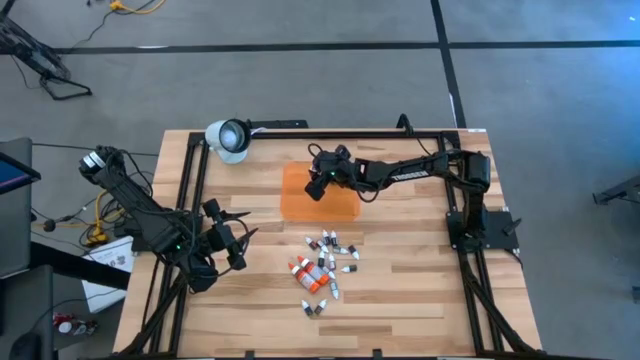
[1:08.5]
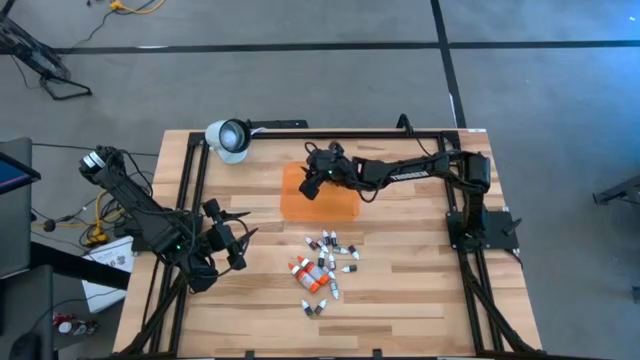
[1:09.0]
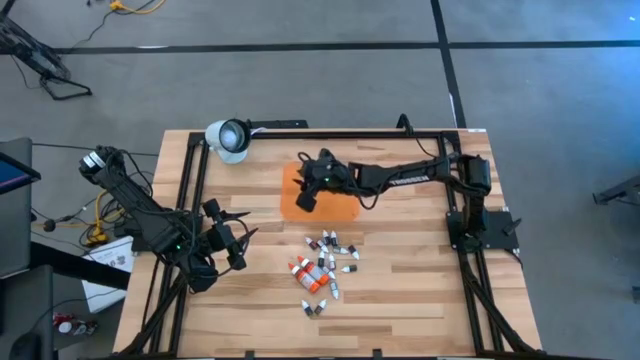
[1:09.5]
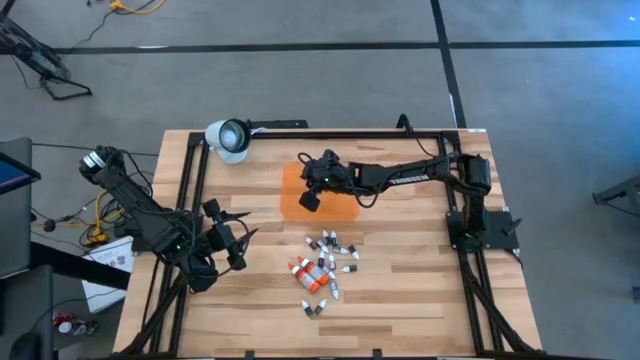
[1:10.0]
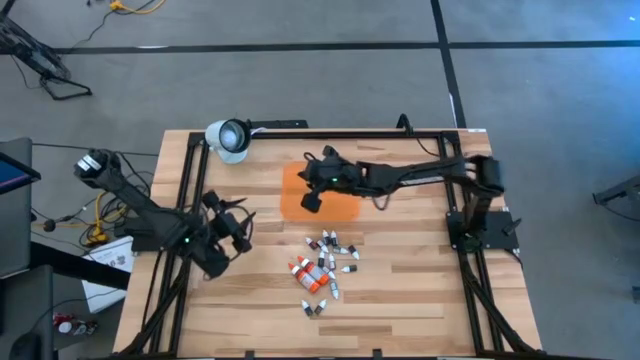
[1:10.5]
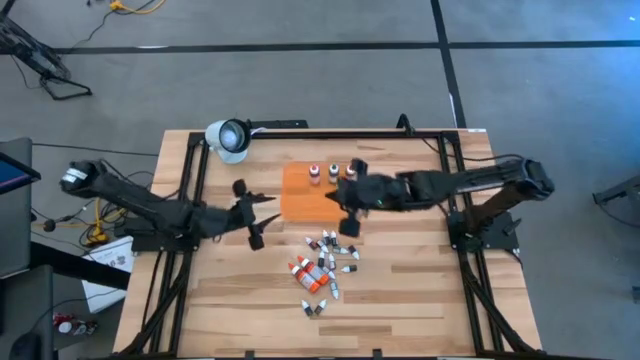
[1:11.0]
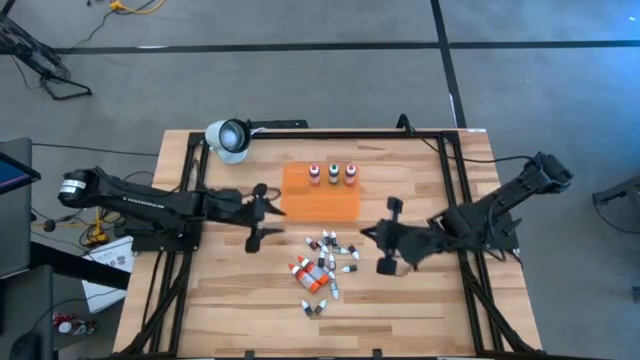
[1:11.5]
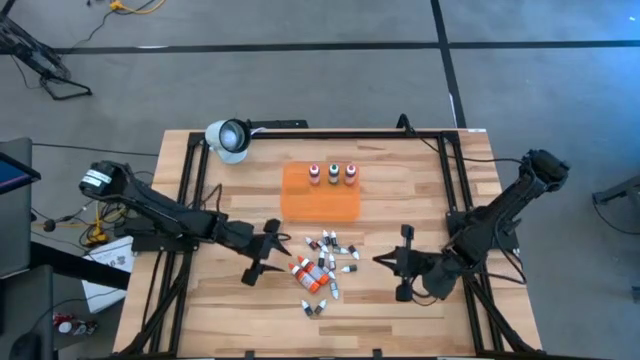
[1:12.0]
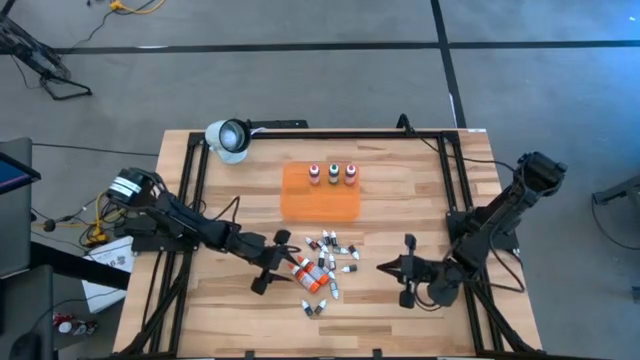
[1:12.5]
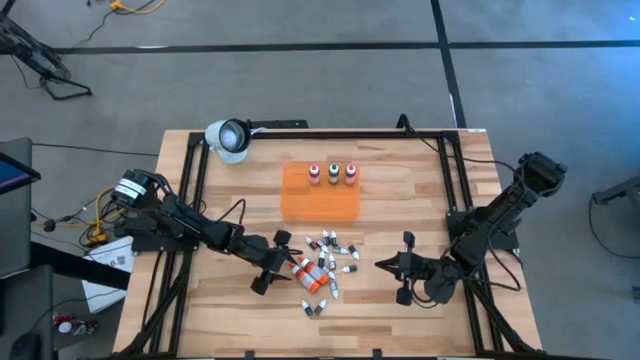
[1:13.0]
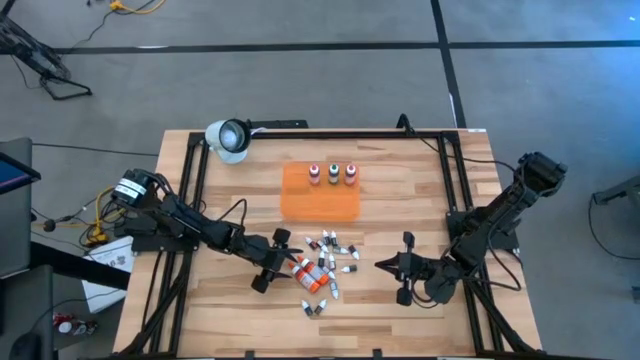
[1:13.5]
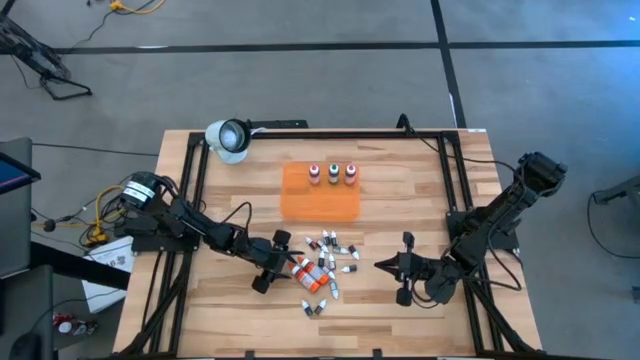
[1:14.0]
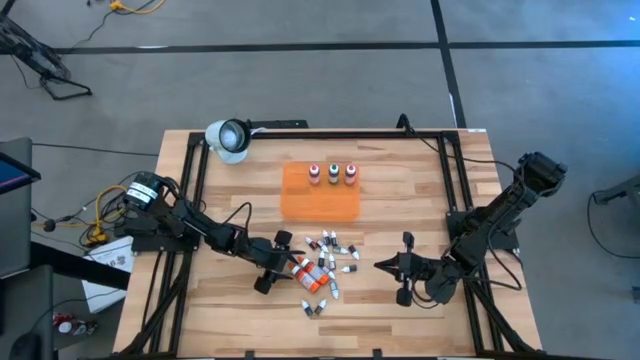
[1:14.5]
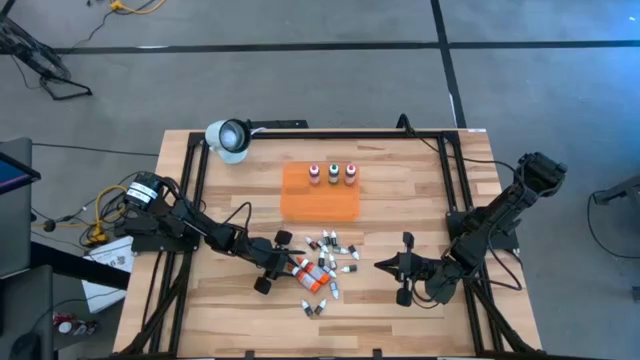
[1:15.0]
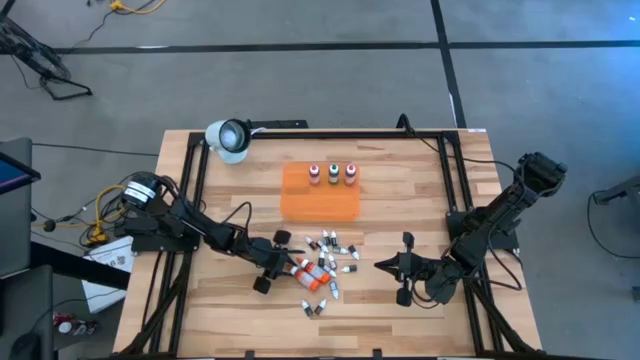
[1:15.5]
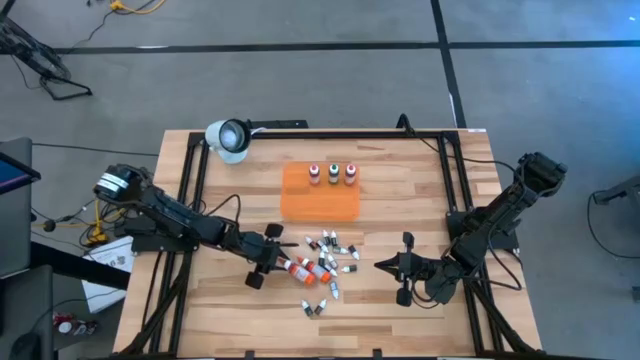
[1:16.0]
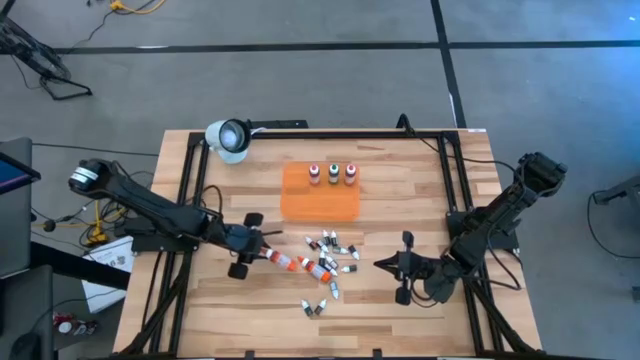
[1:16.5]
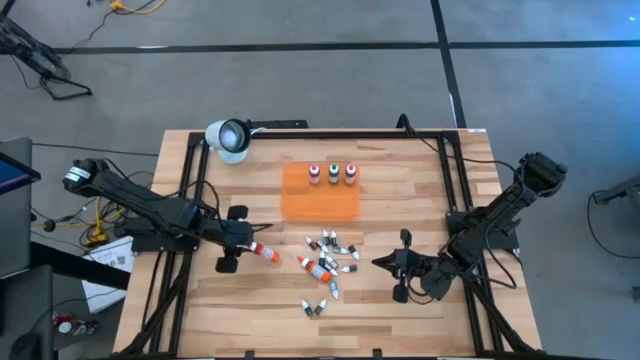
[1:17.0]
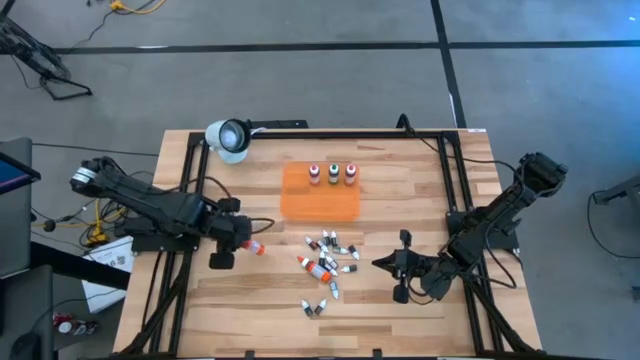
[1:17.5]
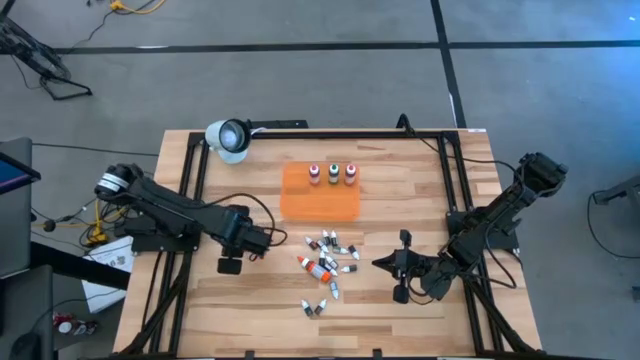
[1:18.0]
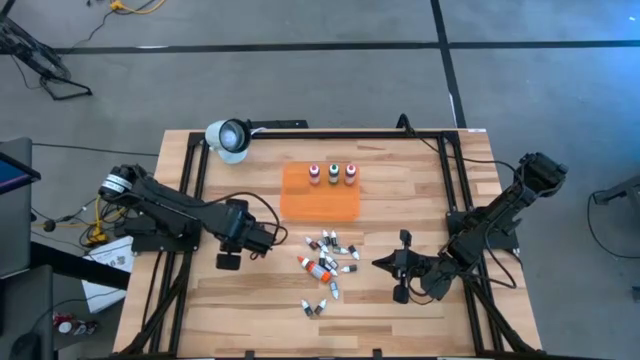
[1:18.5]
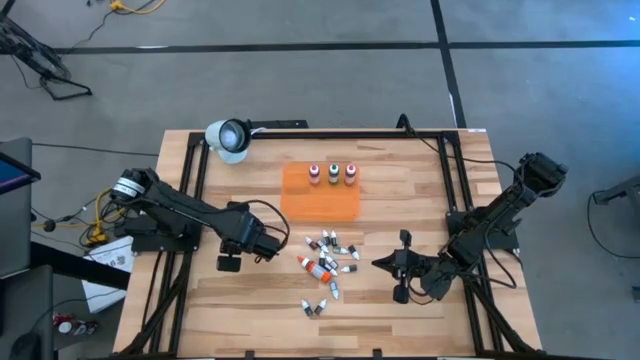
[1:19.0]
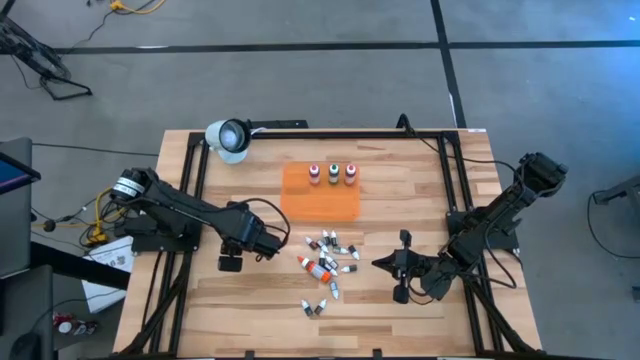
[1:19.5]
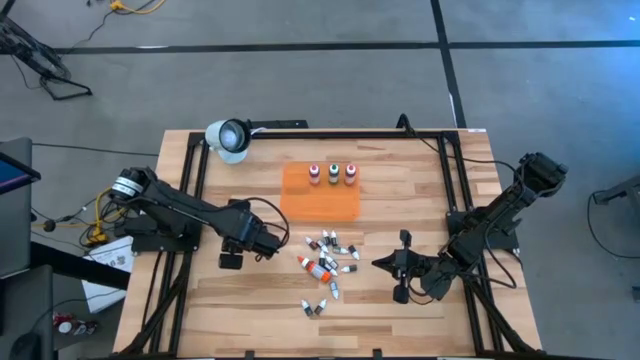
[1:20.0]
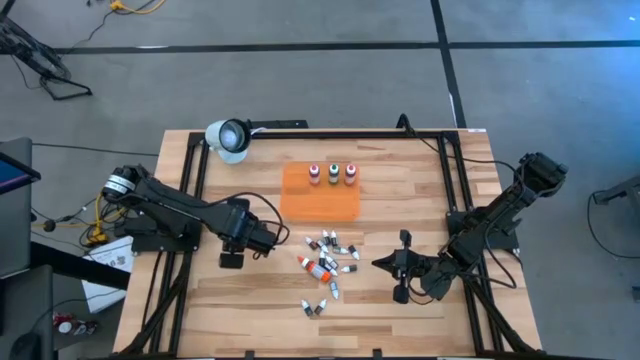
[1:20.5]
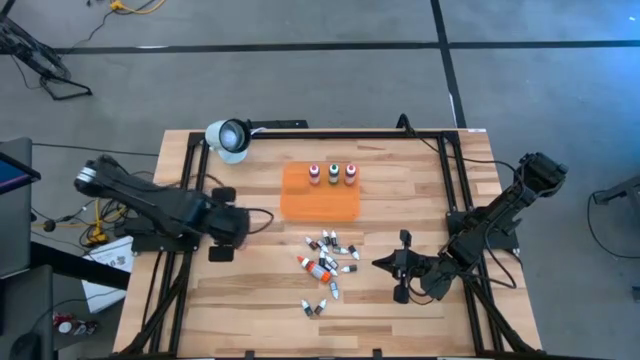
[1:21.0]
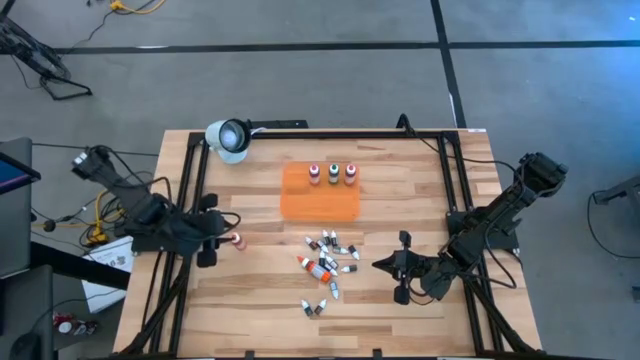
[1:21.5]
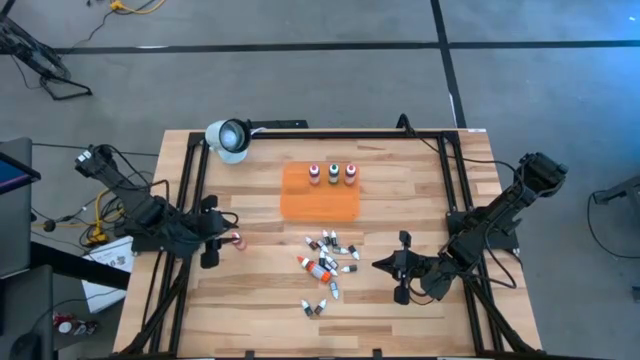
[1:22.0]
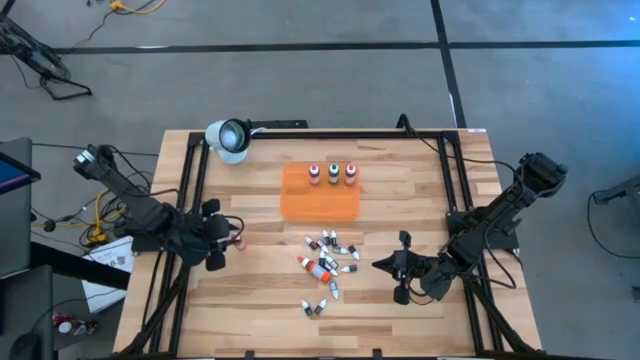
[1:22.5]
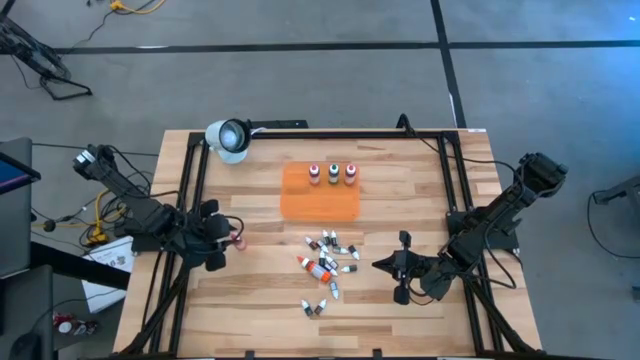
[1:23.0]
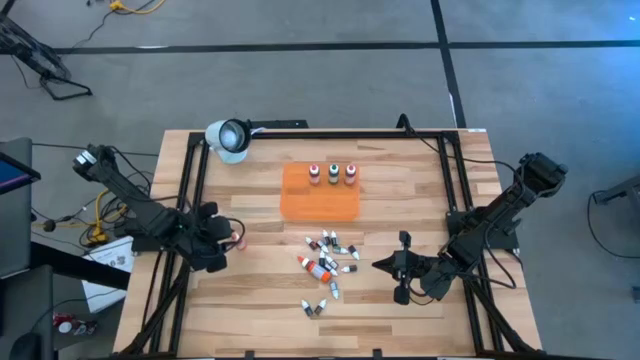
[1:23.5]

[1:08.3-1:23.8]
Task: Pick & Place food coloring
Put the big orange food coloring bottle into the orange bin

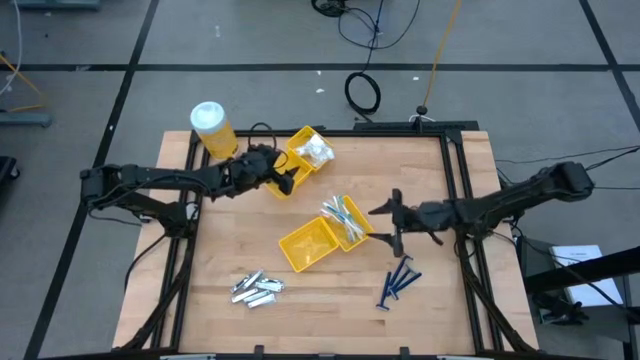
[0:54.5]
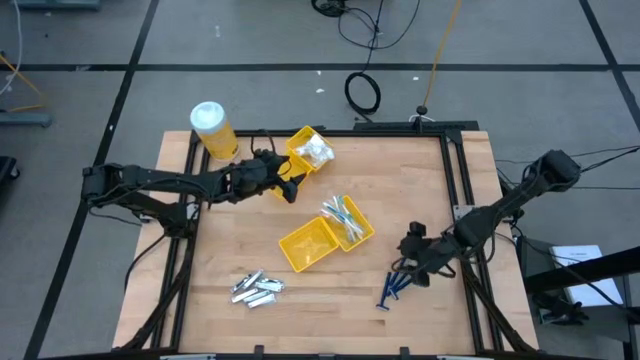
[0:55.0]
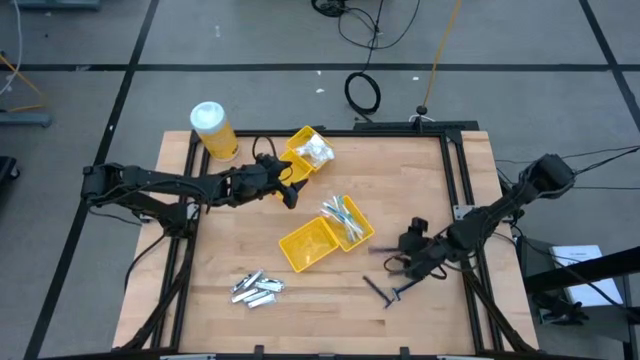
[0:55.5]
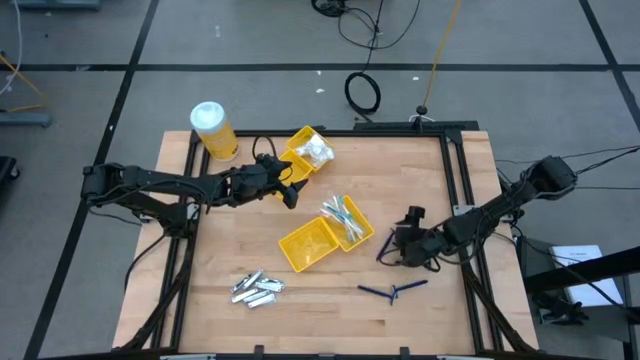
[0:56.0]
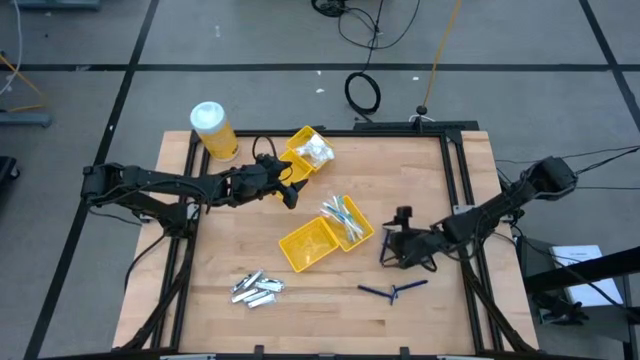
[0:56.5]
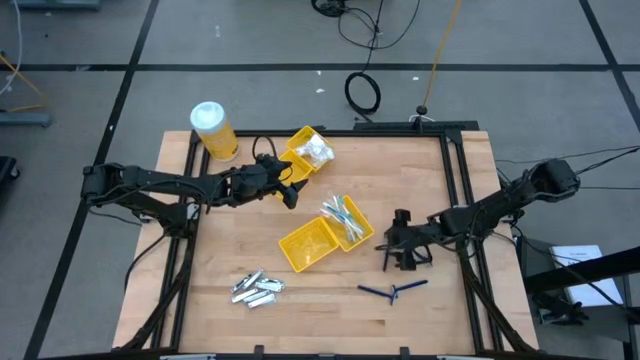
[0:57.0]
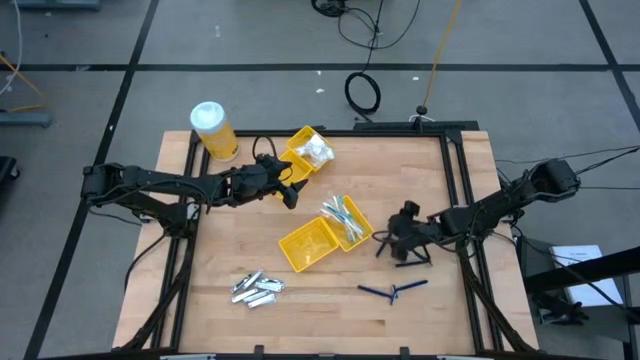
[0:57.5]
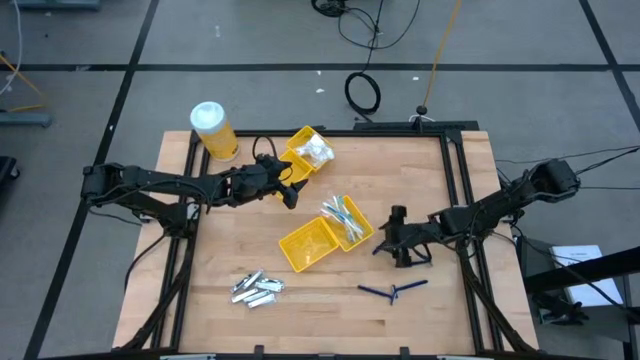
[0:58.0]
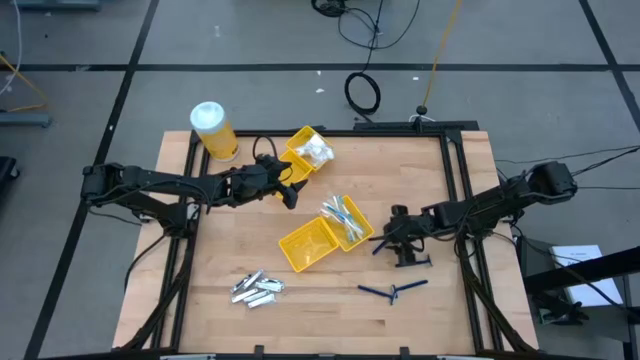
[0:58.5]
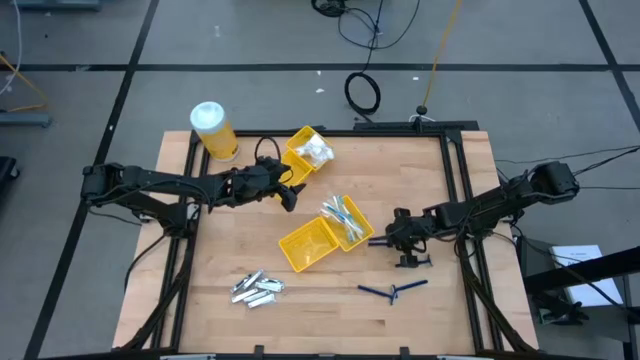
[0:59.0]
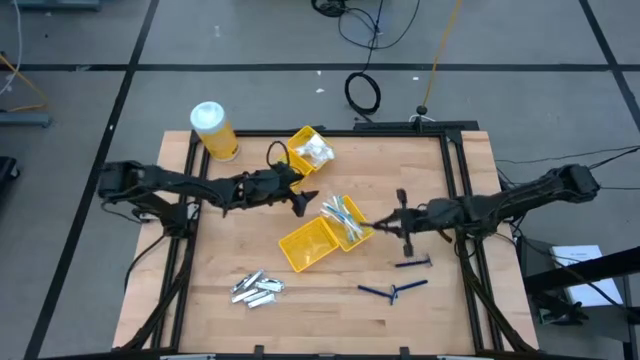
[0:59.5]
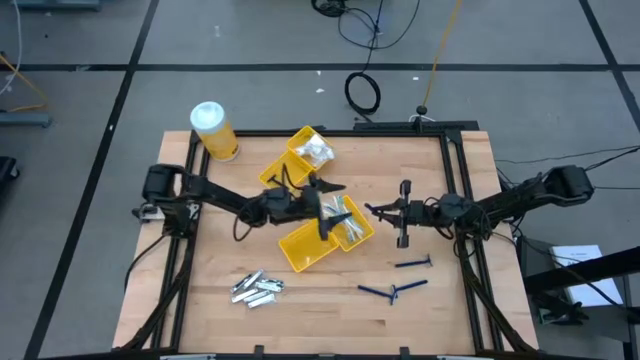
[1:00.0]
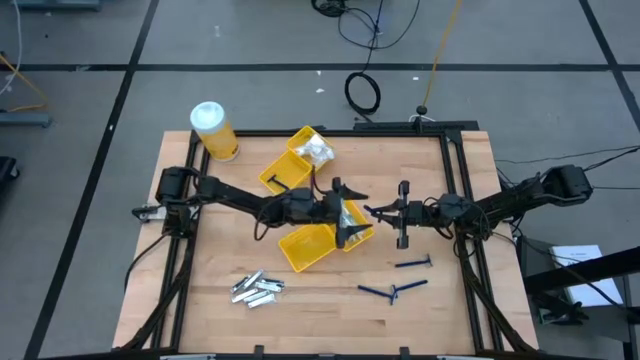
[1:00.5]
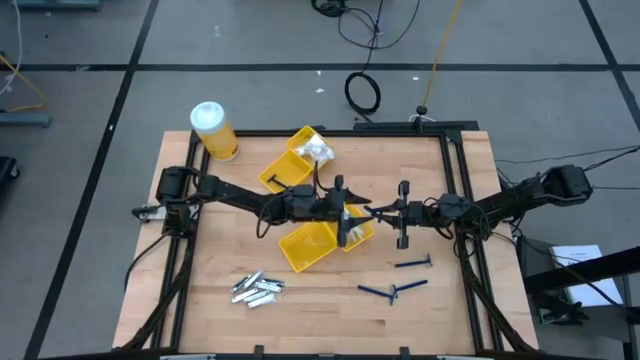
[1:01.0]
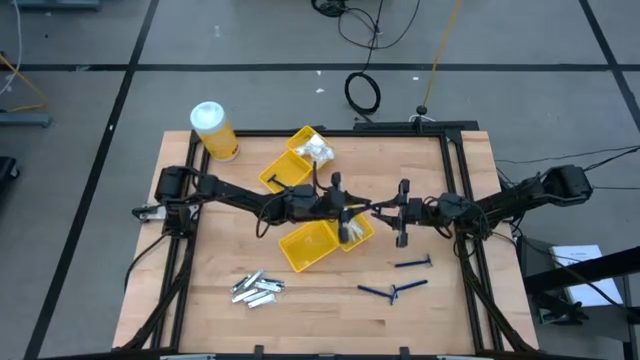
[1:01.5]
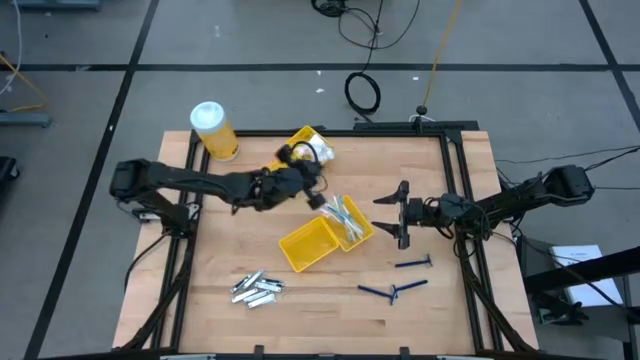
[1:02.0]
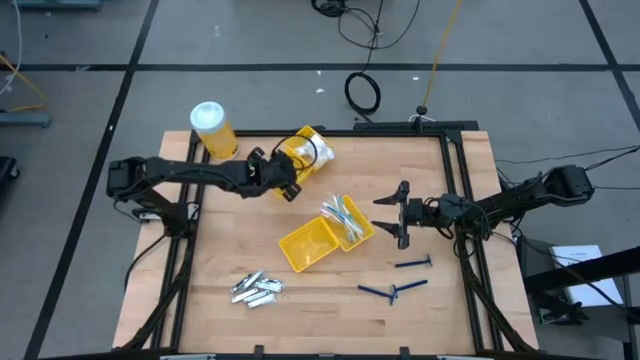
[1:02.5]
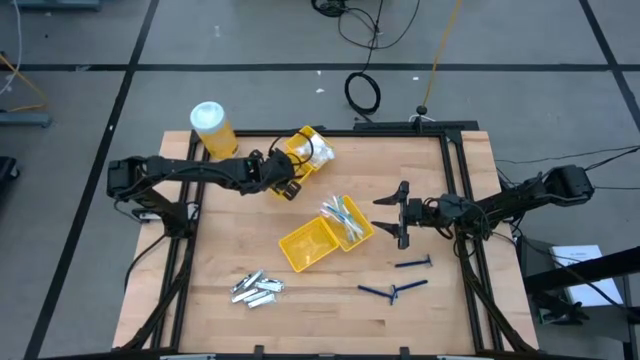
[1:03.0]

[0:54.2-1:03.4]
Task: Pick & Place Travel size toiletries
Put the blue razor into the bottom left yellow basket
